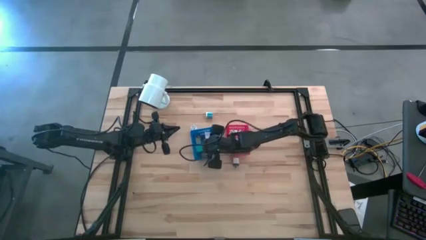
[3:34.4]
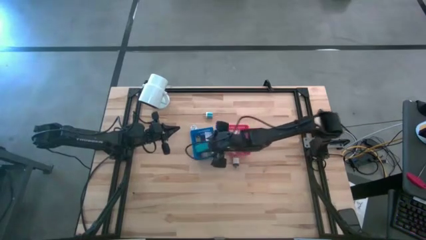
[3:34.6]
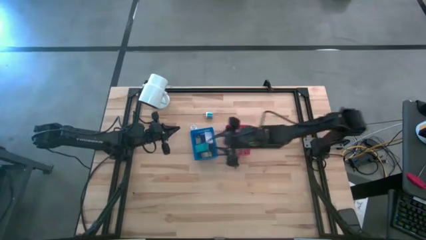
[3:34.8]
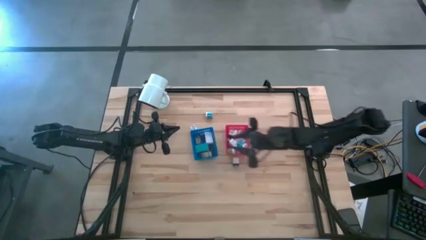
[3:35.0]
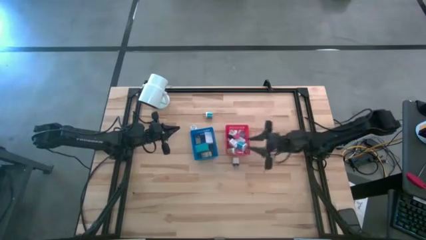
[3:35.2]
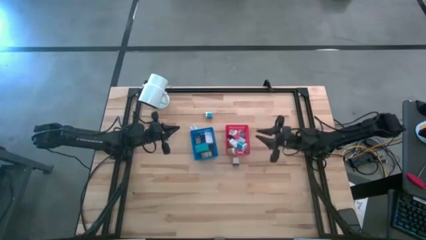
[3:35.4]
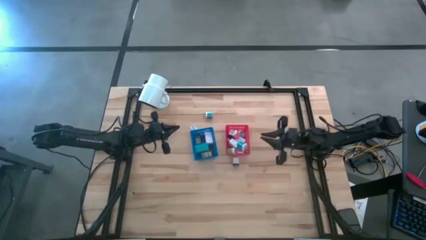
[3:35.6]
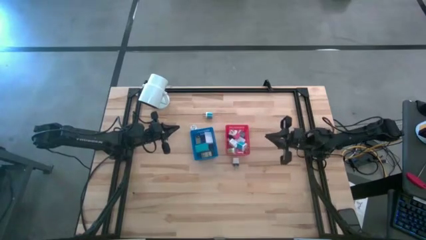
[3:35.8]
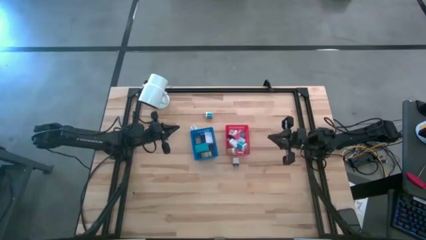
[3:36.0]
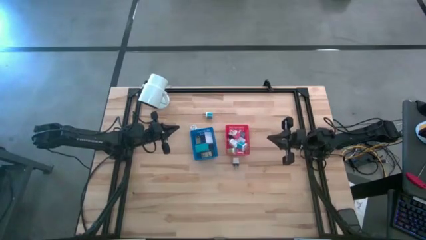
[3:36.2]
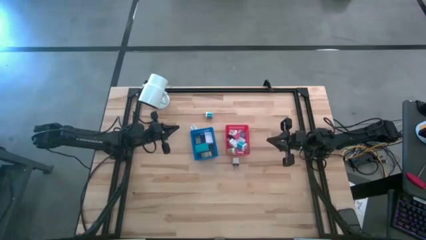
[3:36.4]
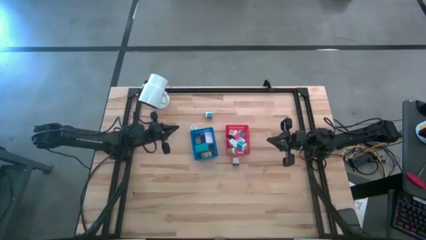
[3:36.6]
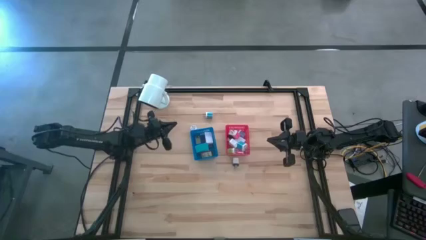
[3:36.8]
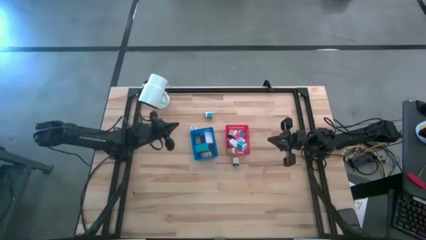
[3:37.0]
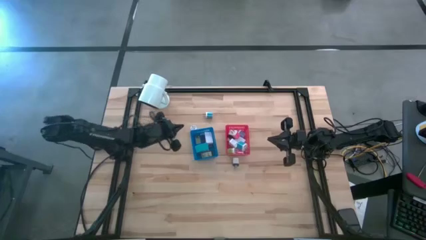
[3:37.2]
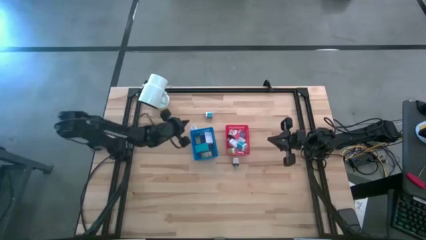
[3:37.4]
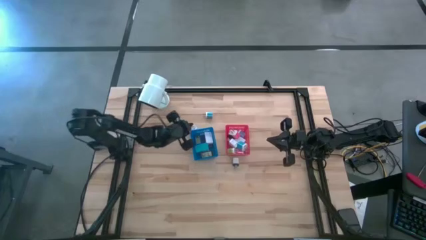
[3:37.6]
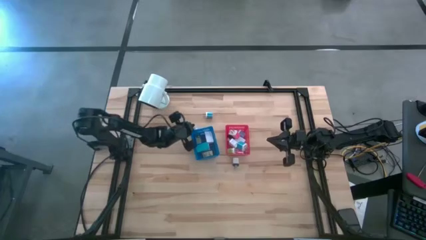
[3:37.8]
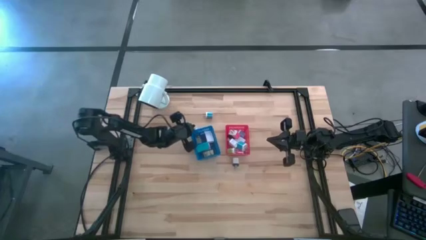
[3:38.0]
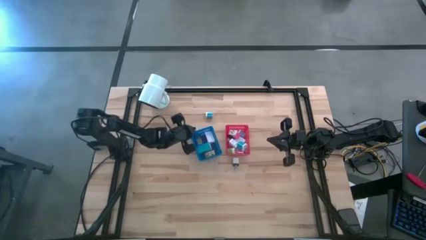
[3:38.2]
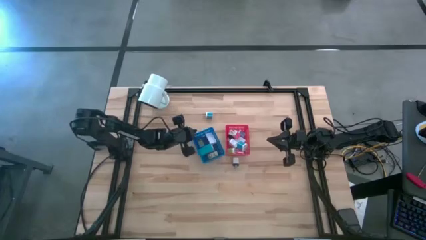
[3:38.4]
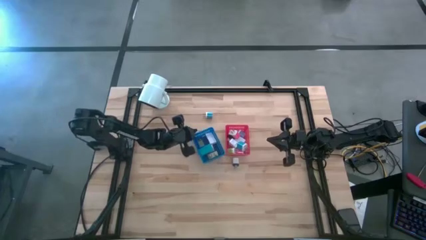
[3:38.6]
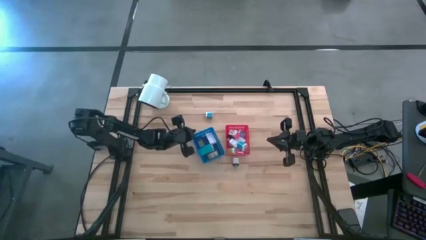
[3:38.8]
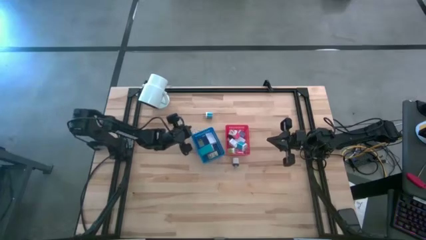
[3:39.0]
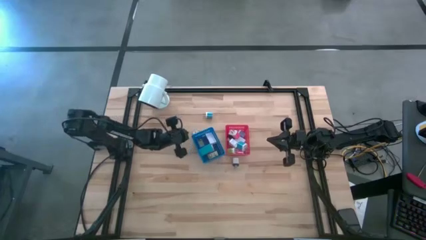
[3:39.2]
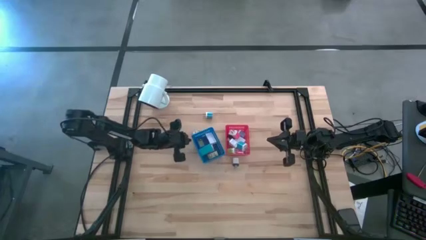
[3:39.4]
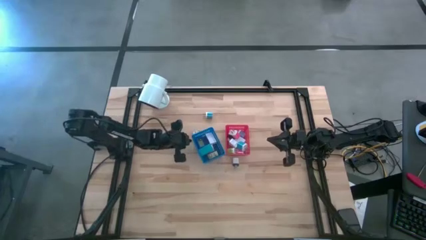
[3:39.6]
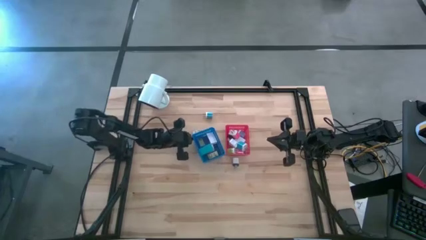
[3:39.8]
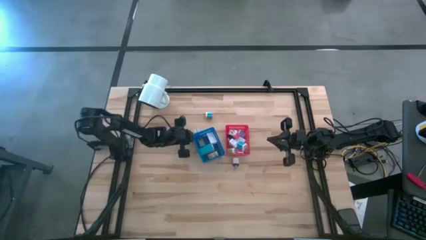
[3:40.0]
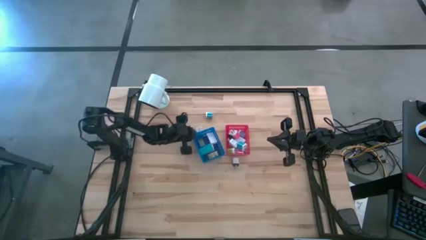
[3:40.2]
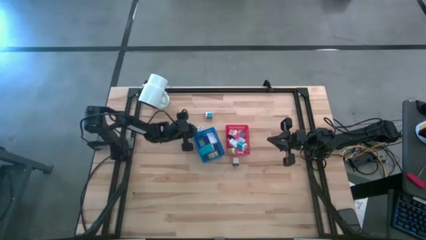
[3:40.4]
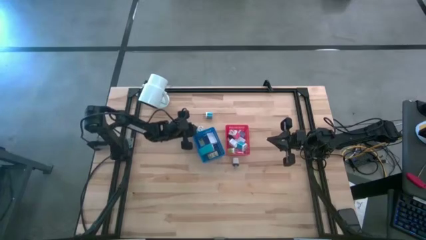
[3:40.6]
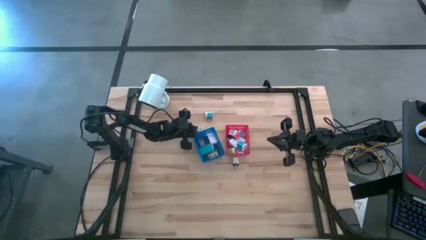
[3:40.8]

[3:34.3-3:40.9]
Task: Pick & Place Office items
Adjust the bottom light blue charger adapter

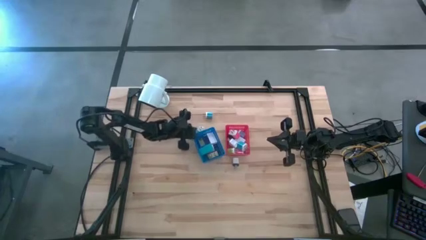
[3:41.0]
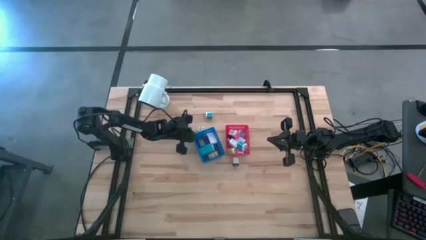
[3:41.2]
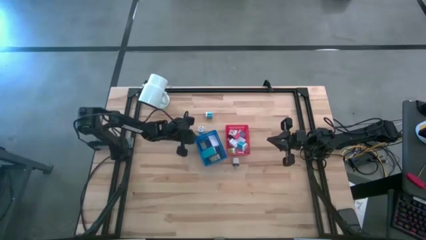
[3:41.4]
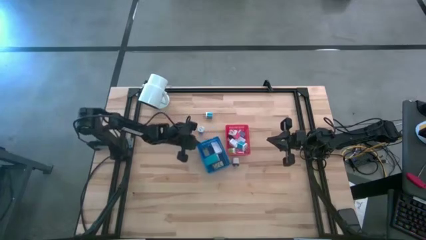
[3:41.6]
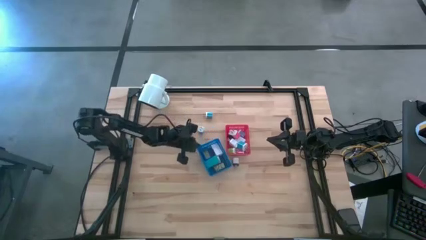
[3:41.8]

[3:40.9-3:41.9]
Adjust the blue bin

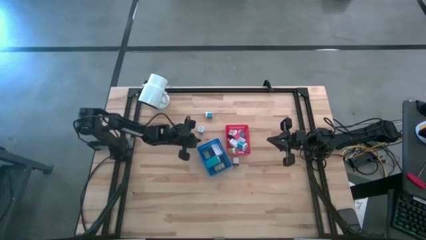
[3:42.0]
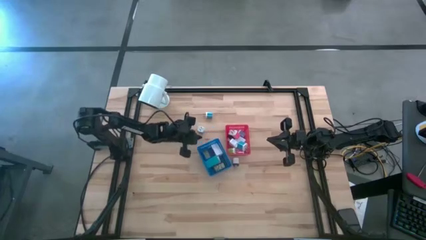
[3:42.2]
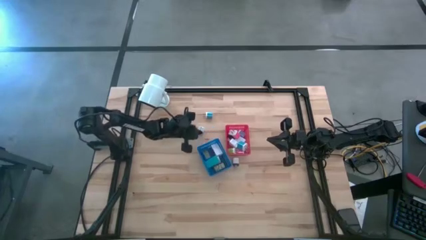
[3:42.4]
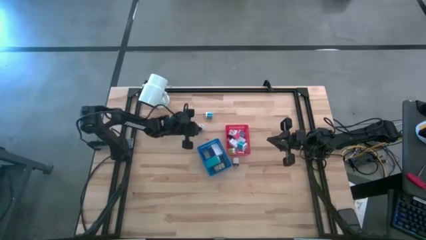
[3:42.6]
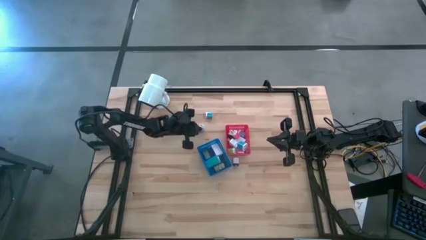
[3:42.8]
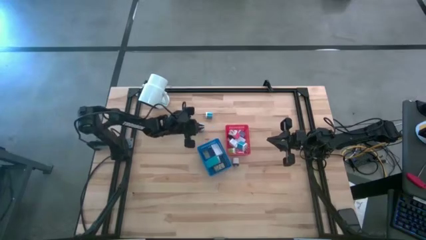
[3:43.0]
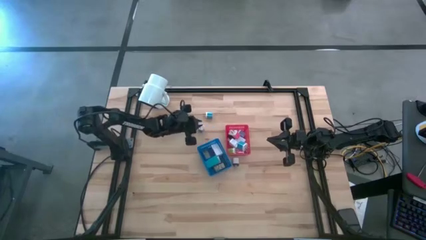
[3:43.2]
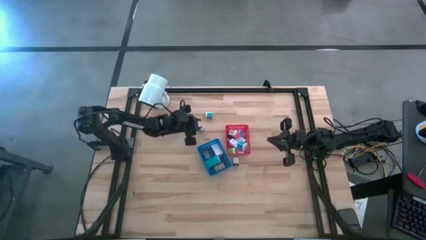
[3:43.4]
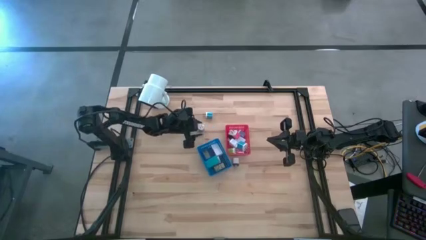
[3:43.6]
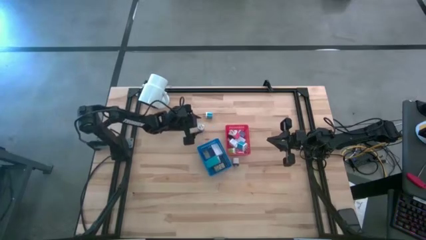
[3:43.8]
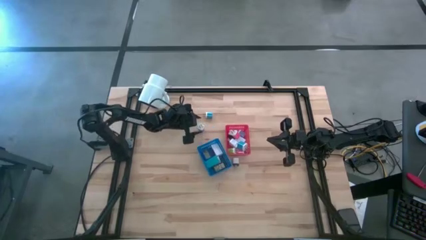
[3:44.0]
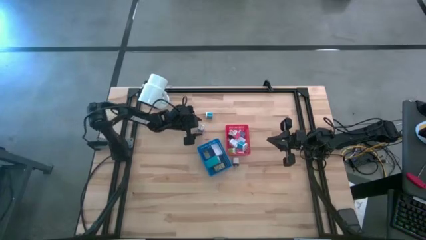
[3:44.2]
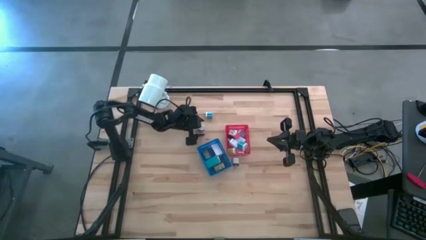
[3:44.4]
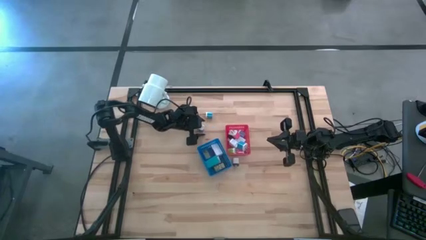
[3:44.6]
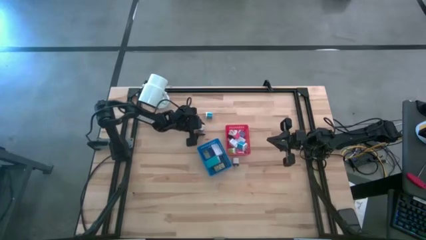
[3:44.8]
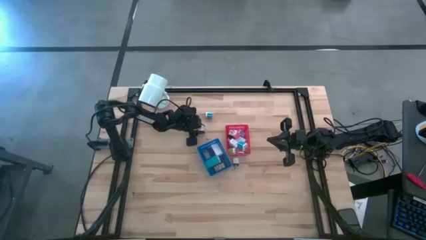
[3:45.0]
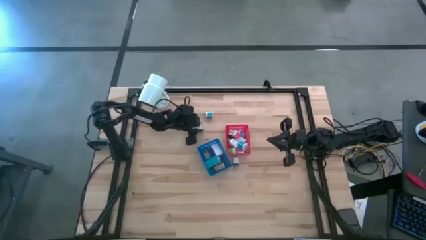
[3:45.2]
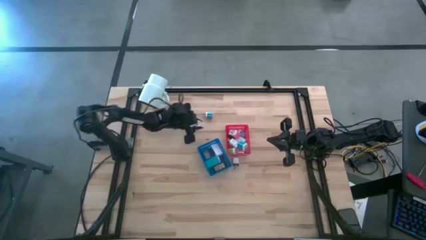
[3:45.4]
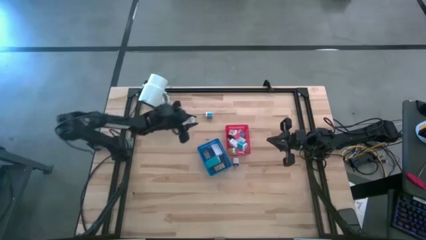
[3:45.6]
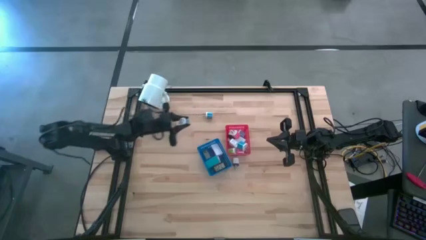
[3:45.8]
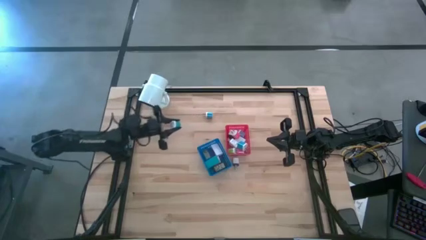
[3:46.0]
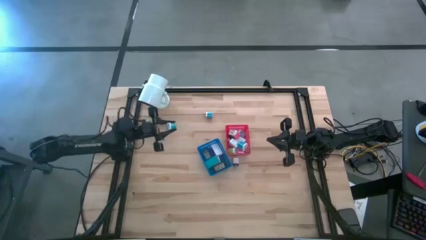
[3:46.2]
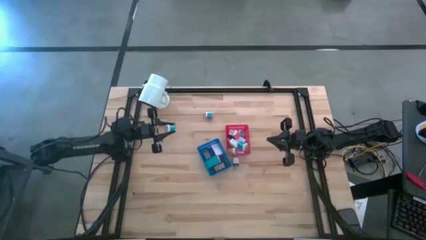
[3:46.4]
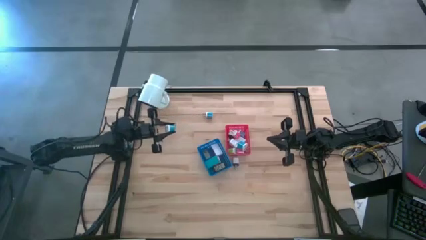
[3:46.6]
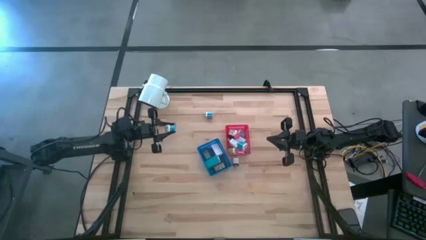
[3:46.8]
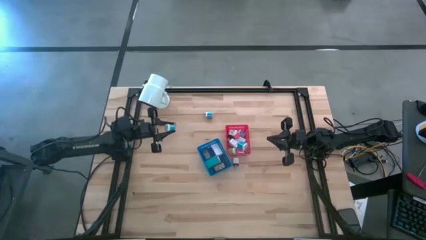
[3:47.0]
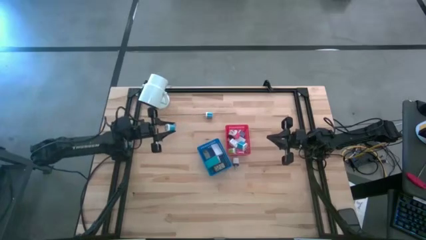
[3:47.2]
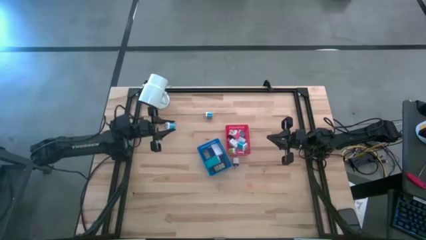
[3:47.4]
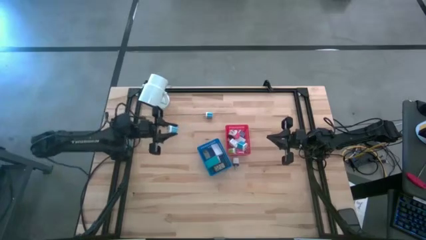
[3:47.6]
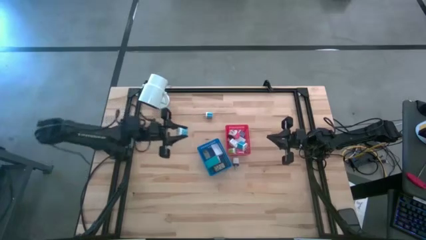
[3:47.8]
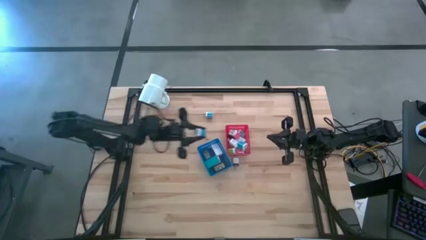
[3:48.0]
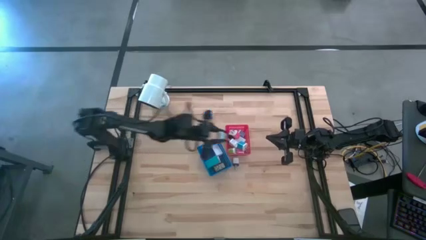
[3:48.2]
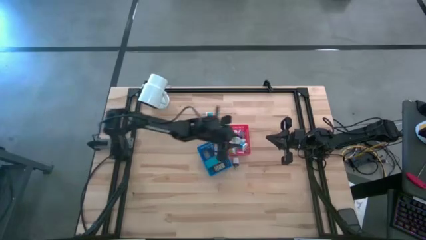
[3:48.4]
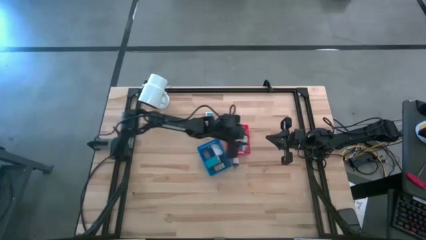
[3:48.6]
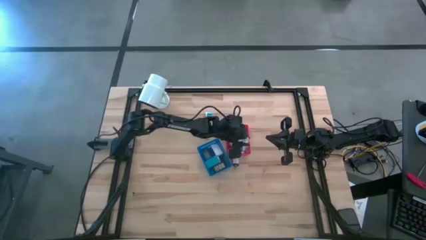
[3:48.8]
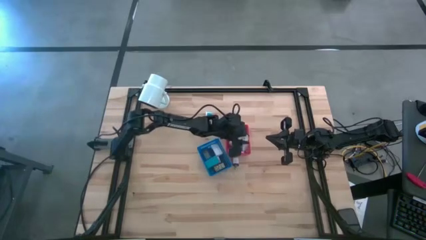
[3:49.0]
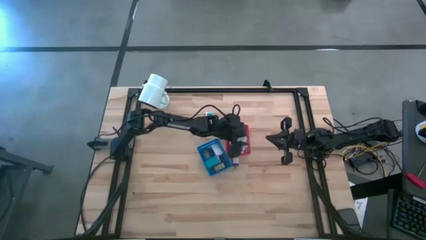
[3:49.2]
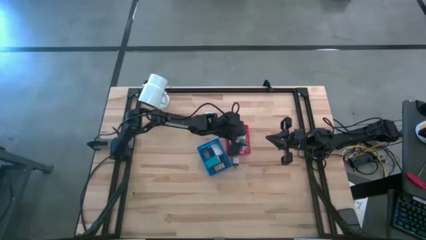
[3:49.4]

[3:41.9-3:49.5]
Put the bottom light blue charger adapter into the red bin
